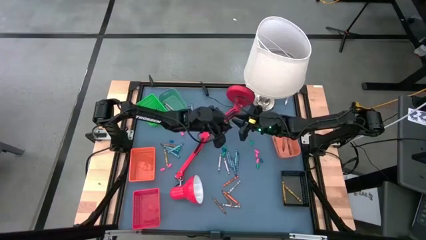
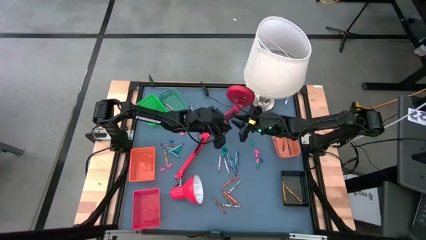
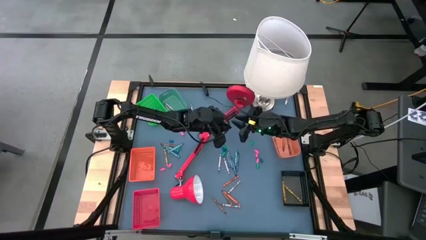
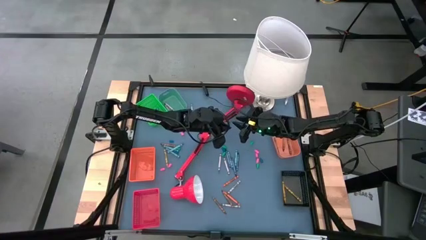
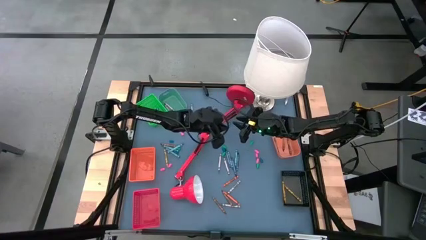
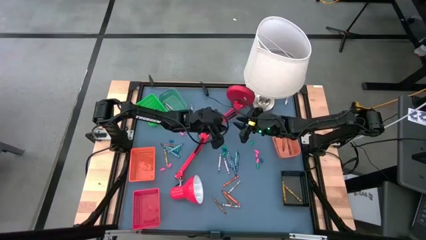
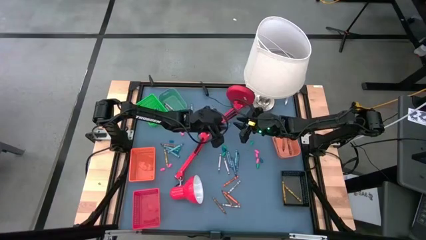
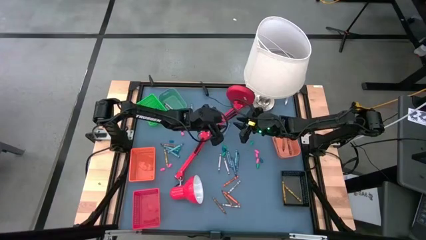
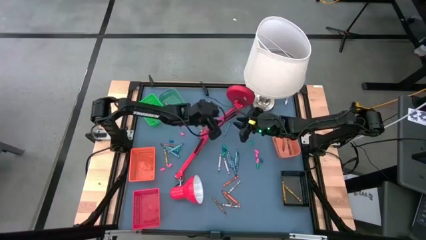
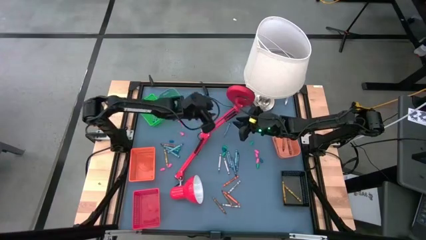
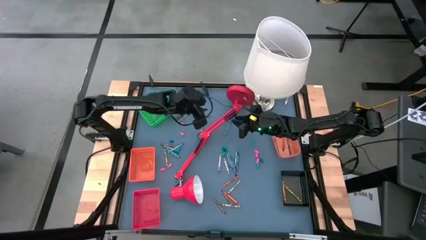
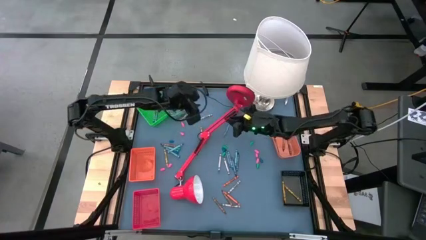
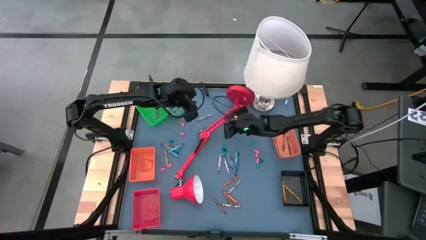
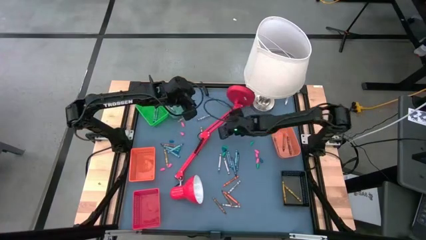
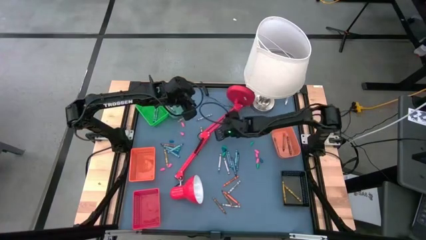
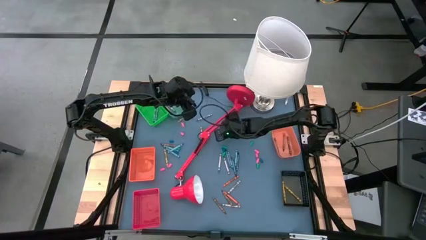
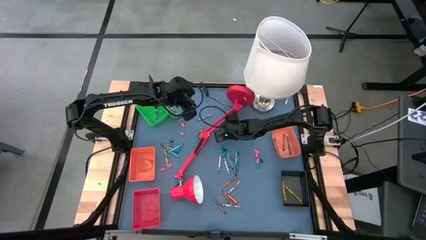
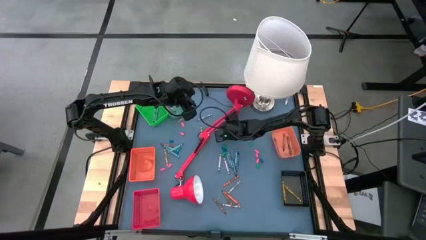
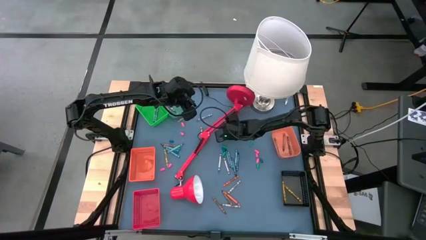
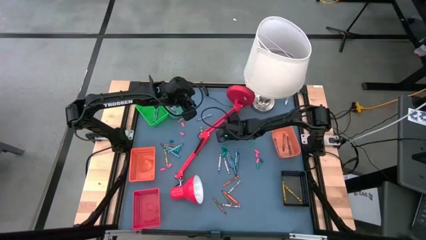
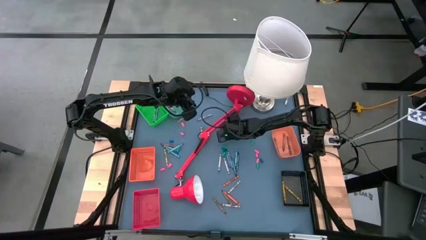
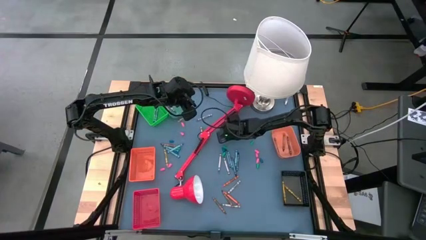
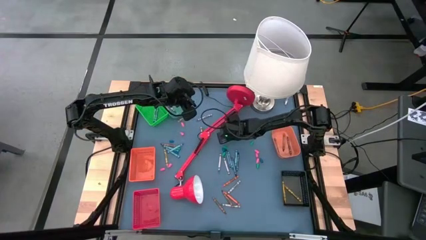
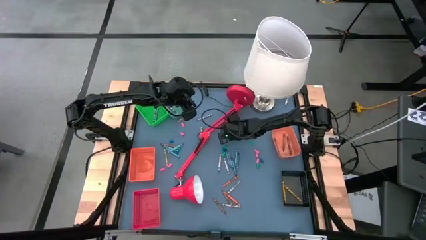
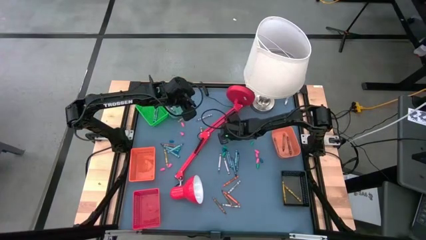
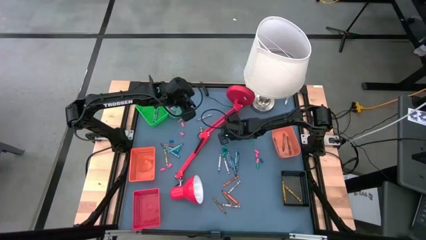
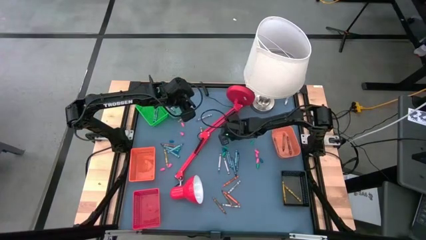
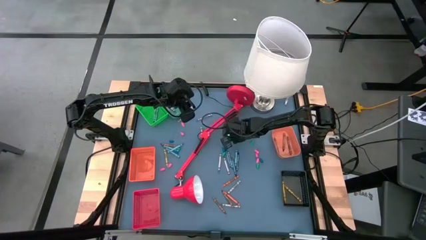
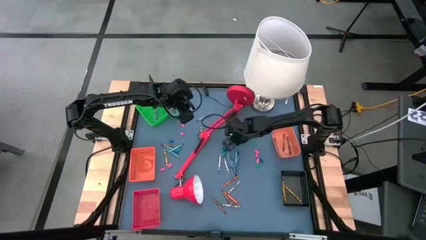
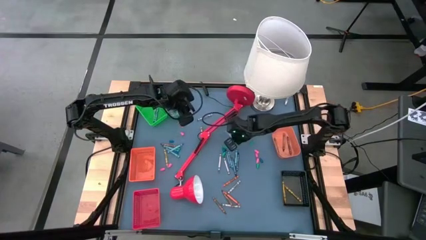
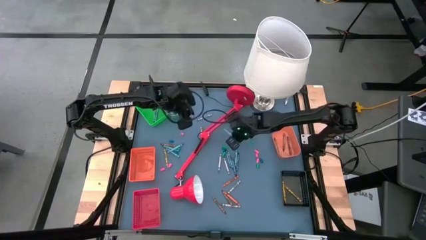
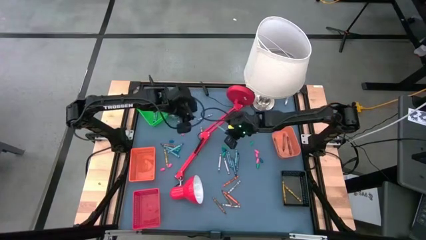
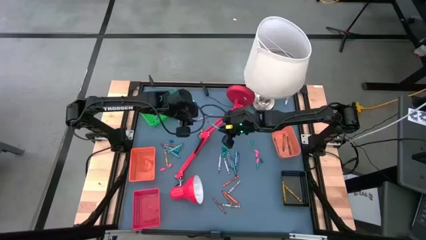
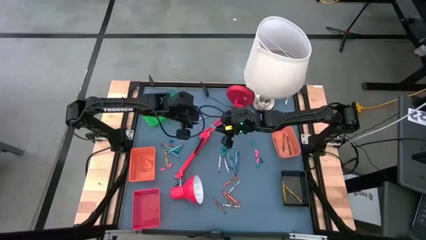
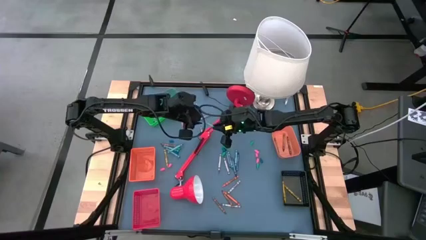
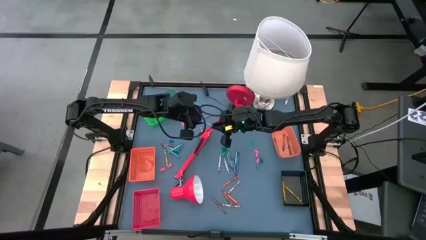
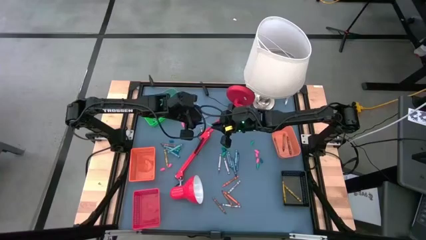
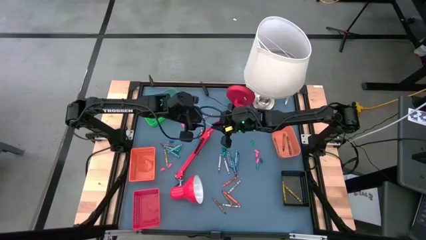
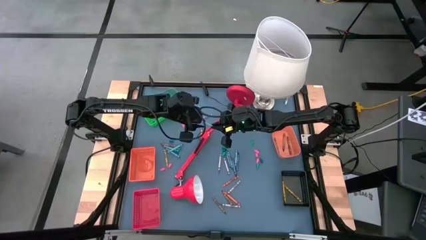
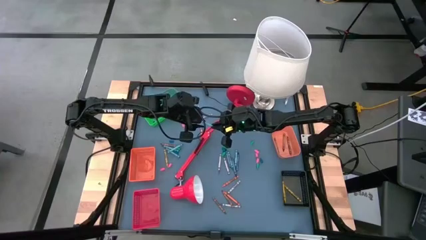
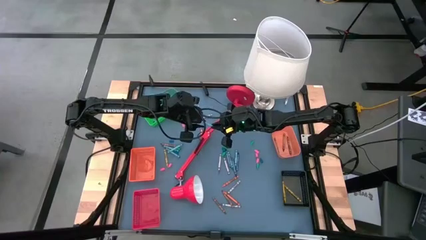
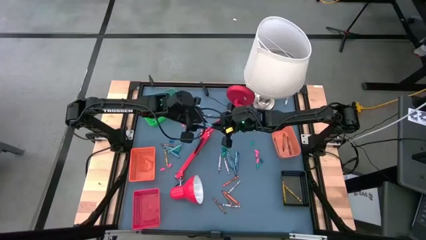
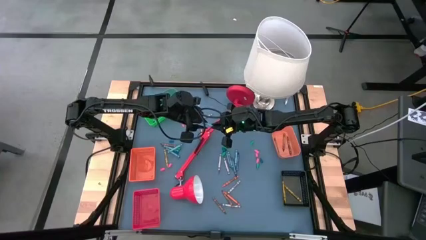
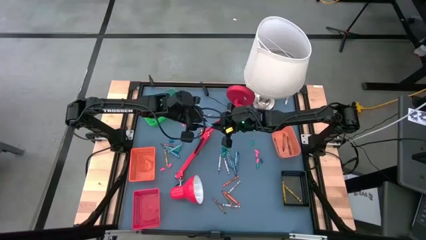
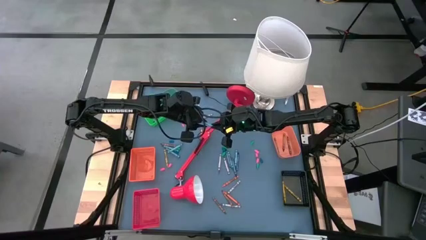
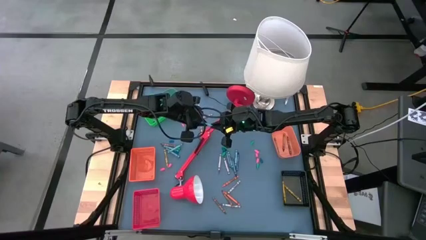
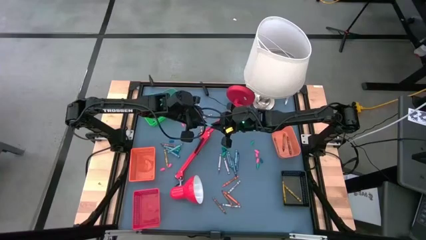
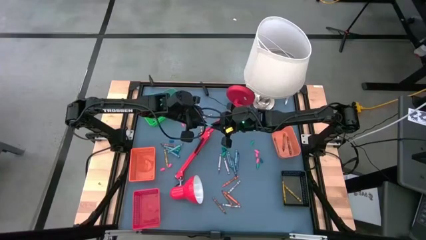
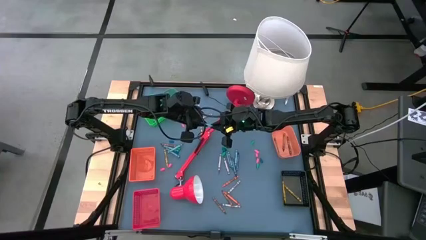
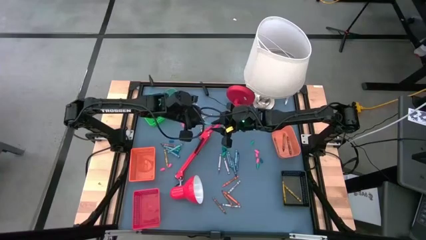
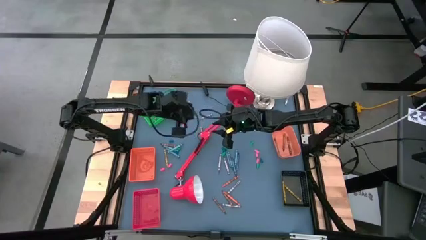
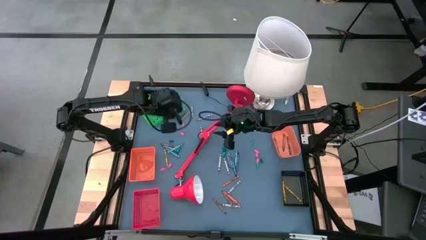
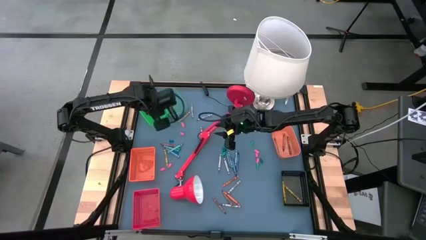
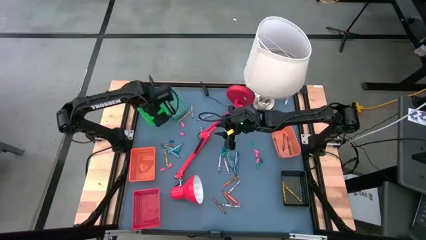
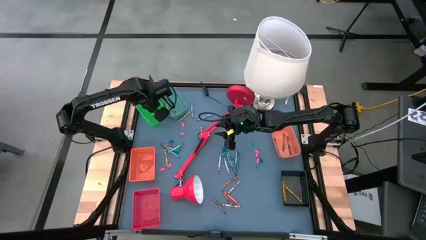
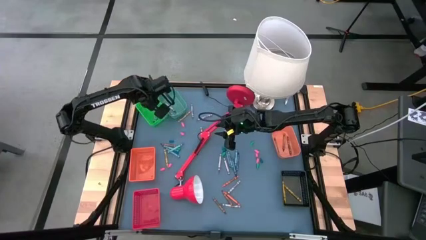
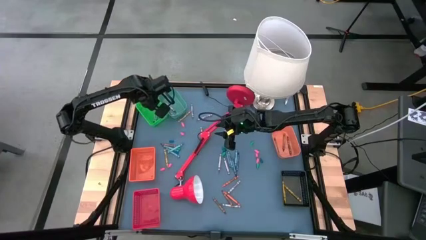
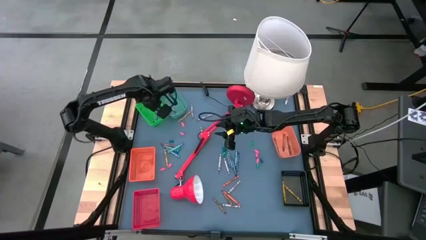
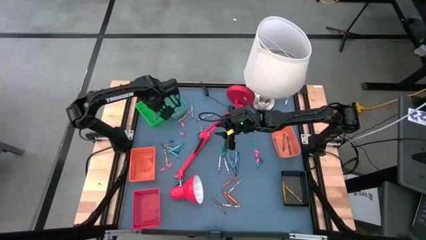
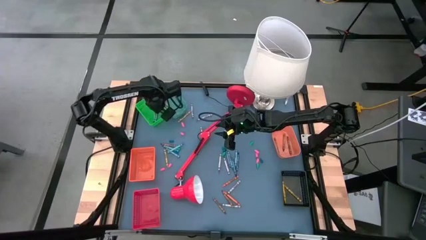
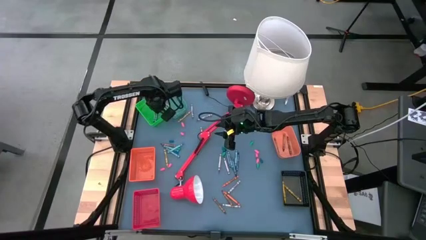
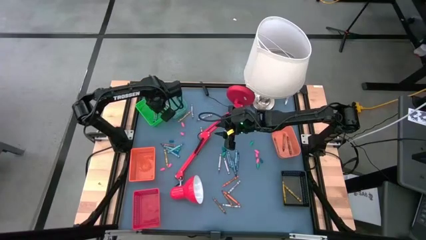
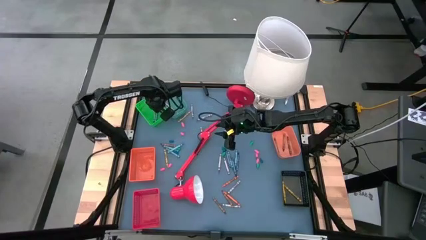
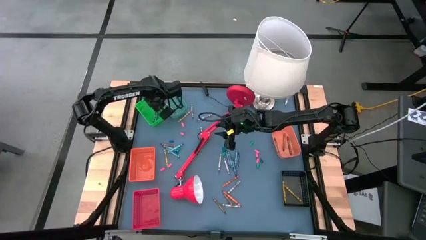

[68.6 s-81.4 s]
Task: Sort crayons
Put the green crayon into the green bin

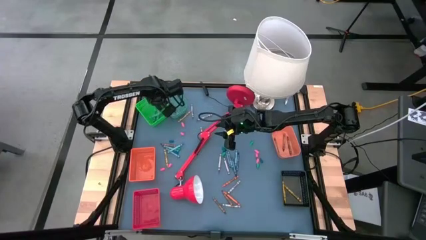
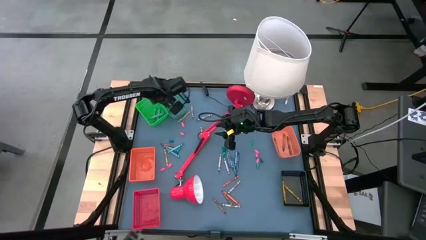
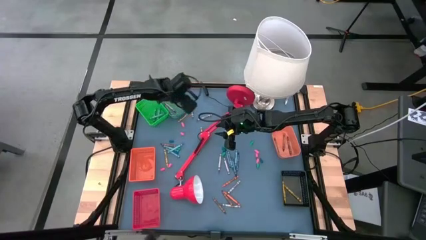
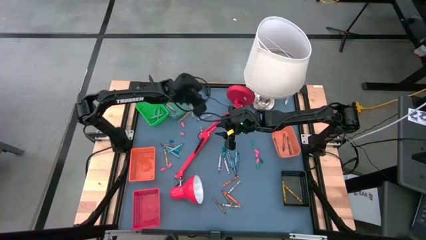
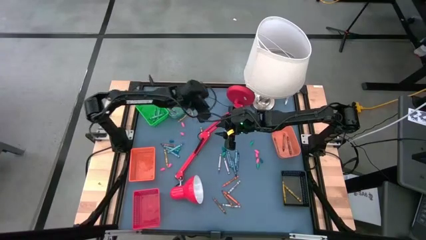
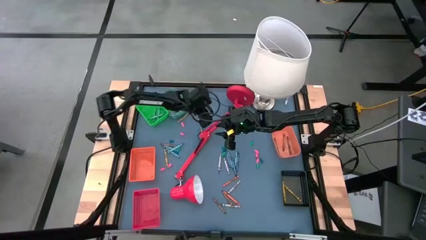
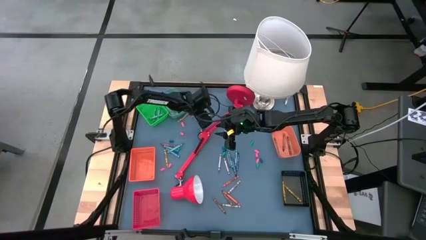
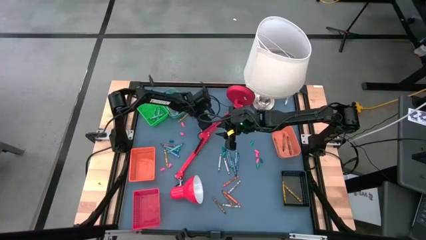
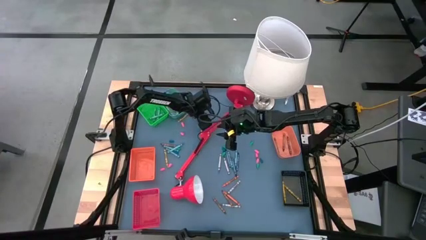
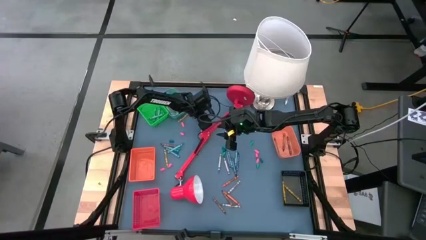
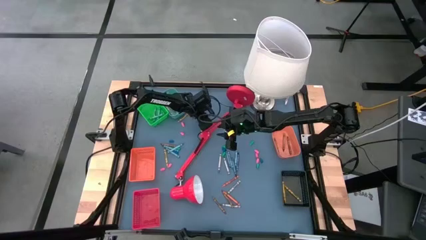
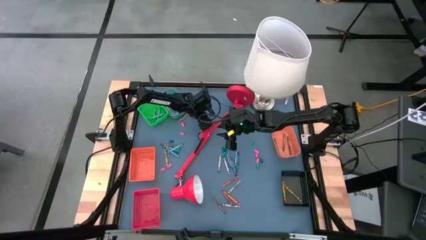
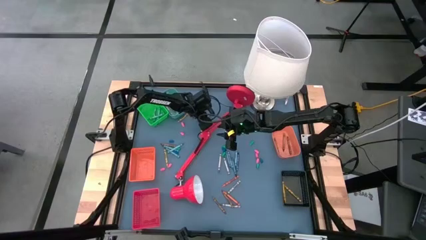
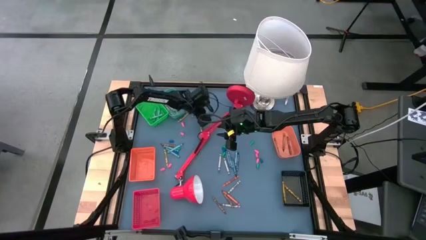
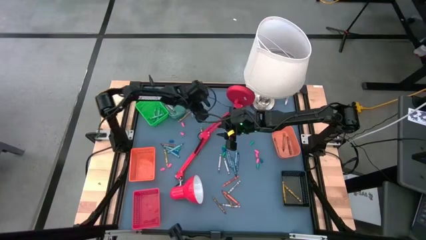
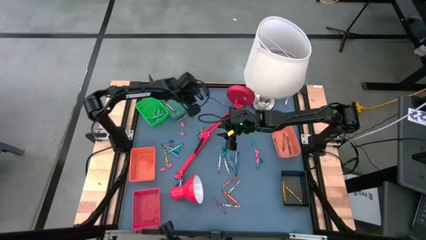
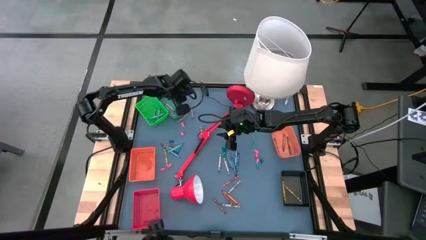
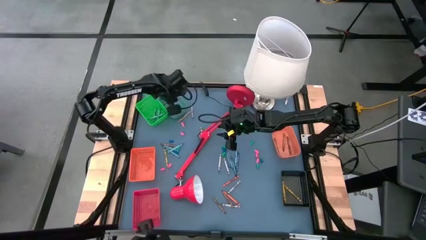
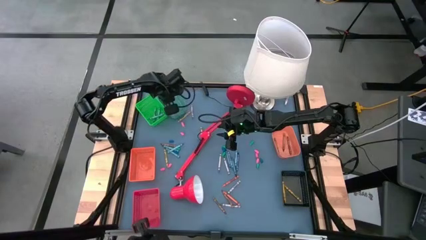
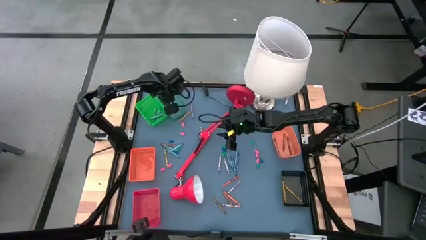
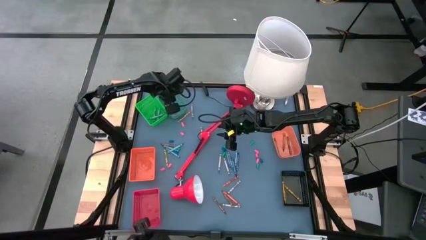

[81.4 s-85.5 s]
Put the gray crayon into the blue bin
